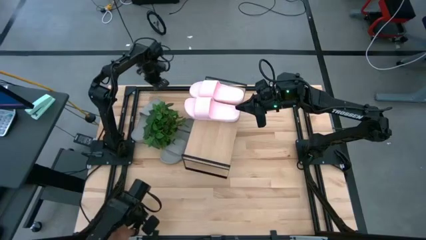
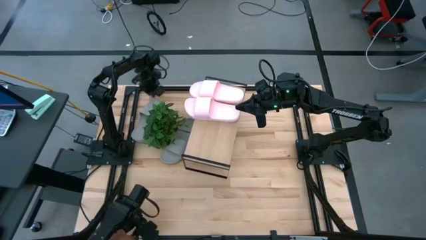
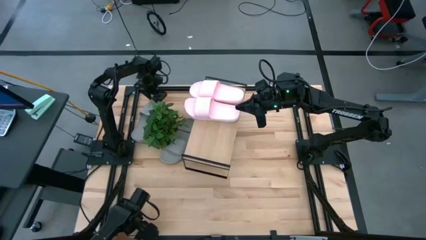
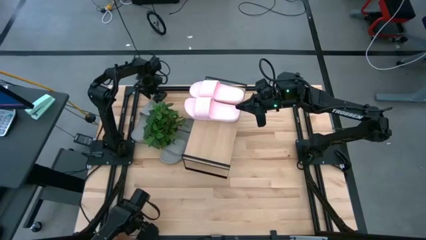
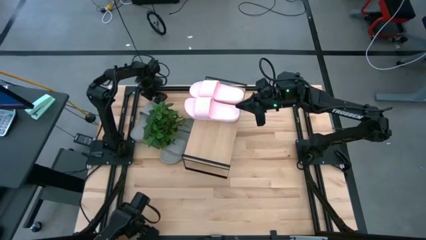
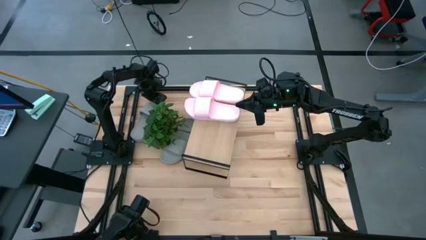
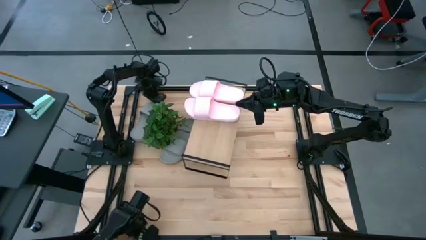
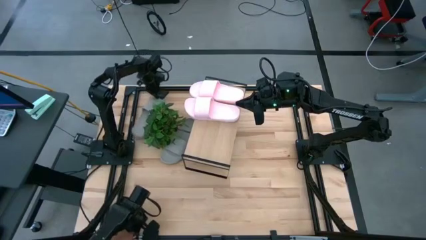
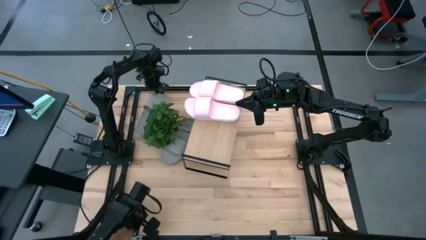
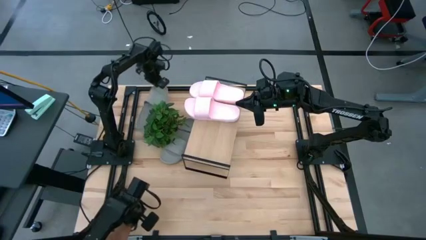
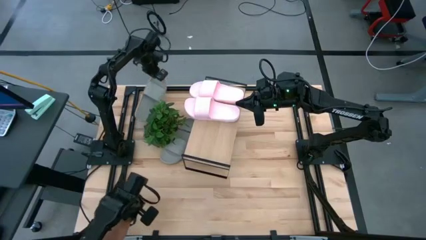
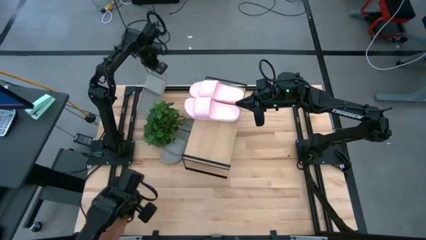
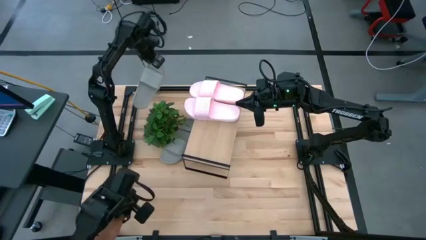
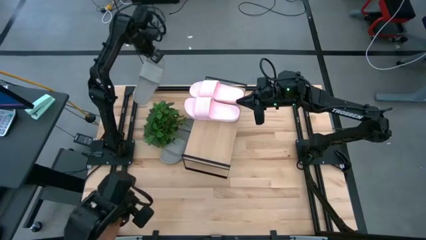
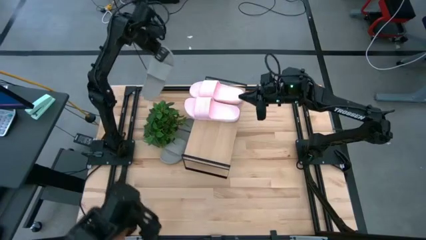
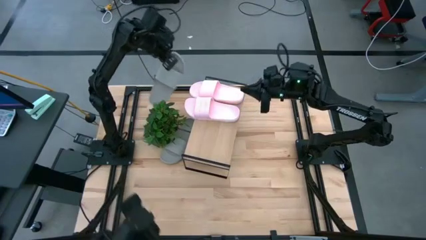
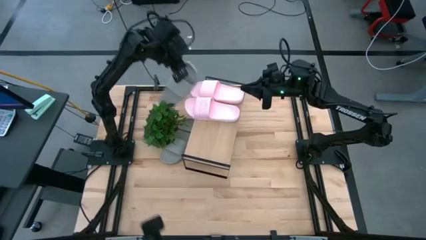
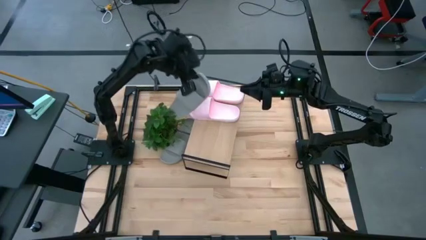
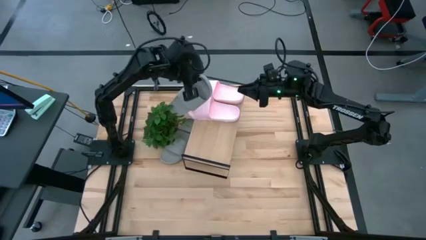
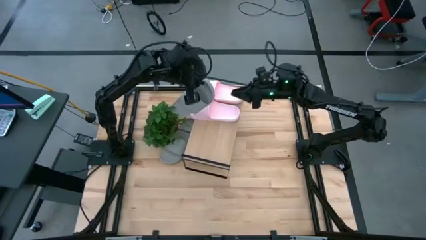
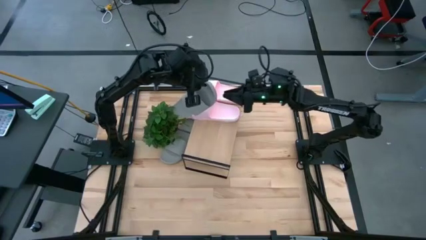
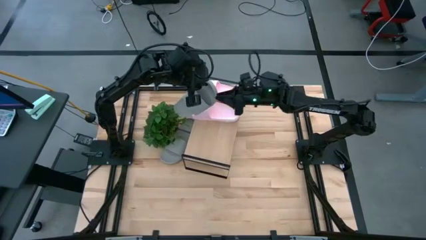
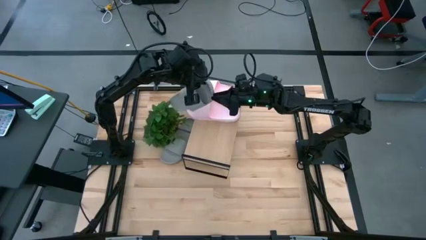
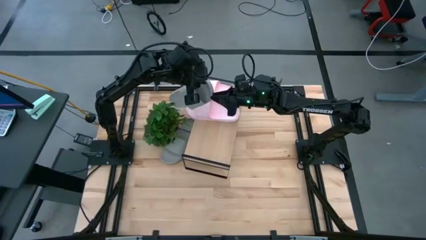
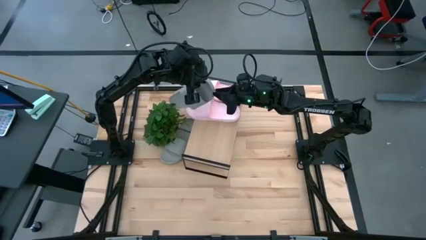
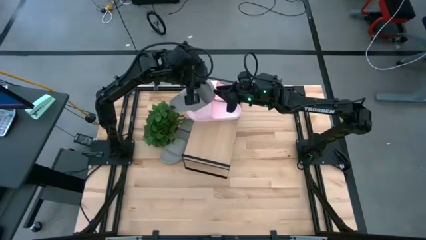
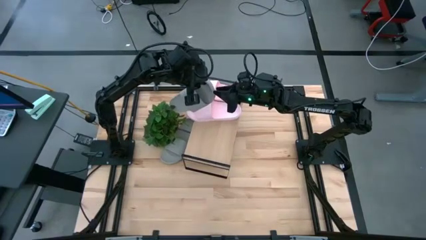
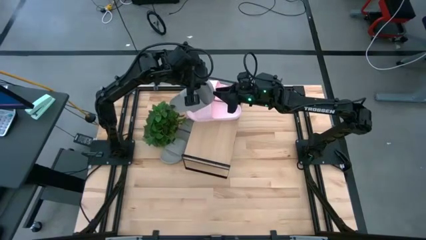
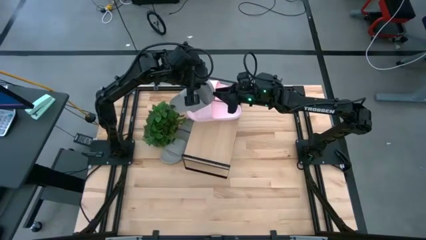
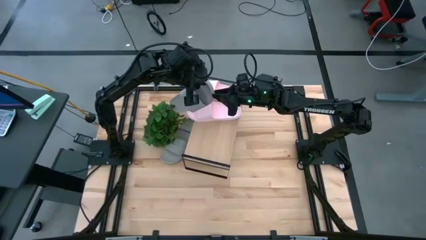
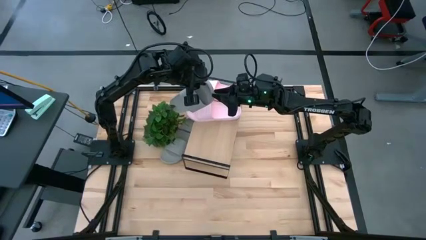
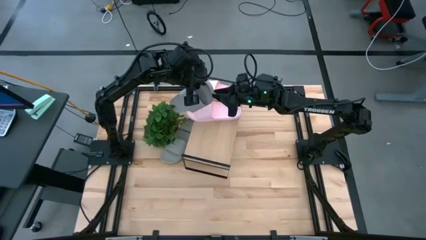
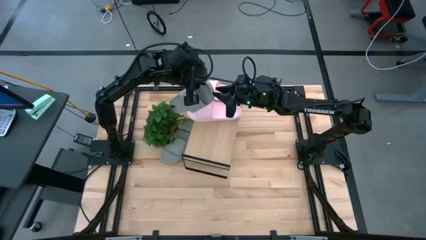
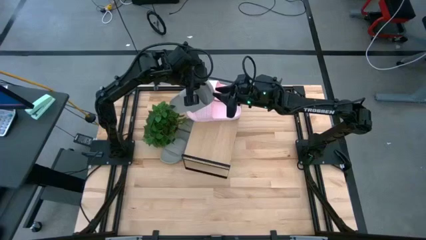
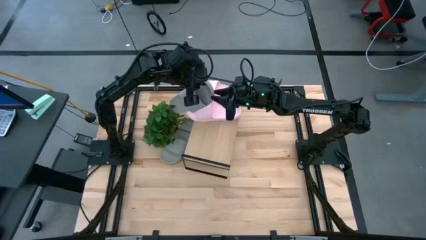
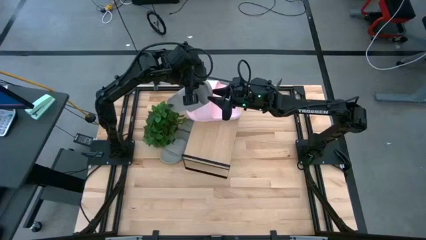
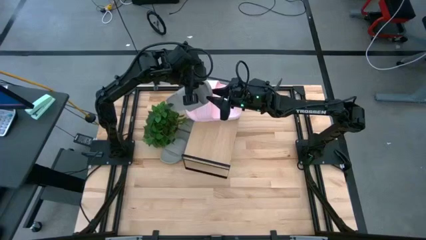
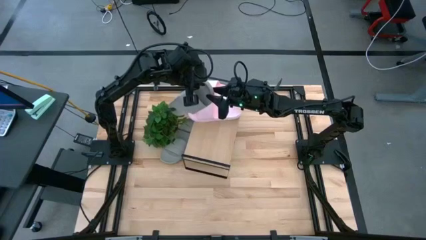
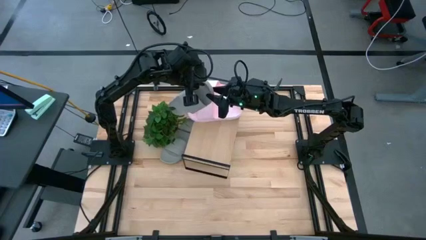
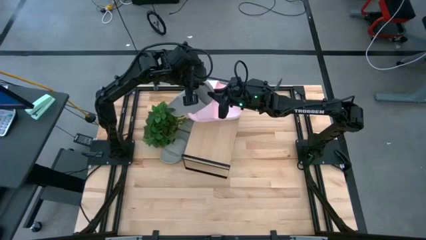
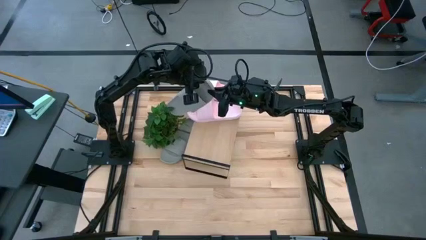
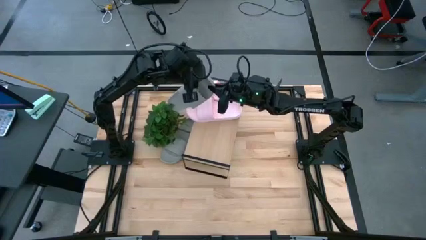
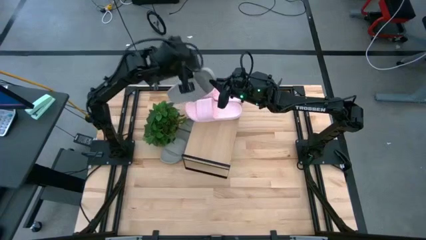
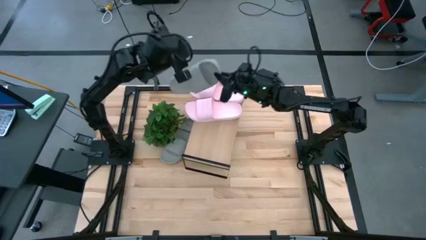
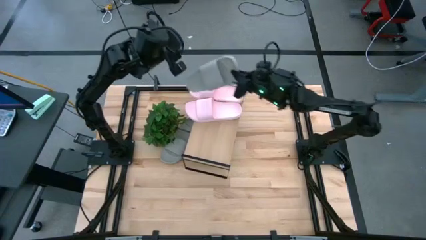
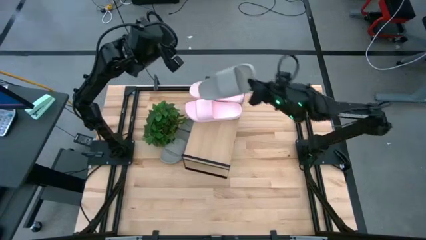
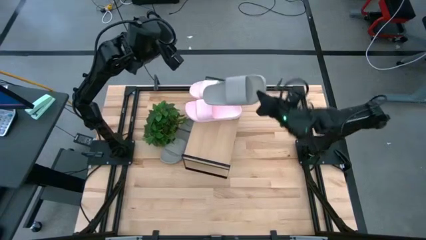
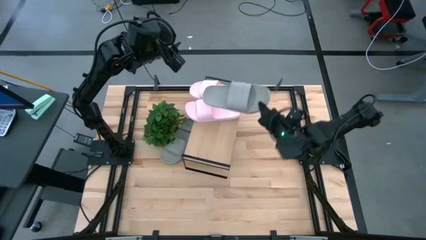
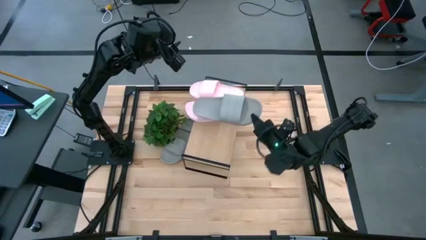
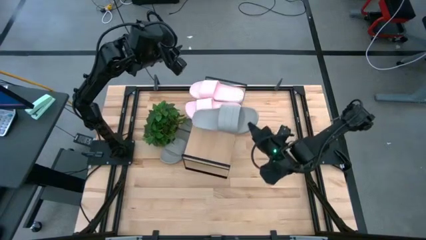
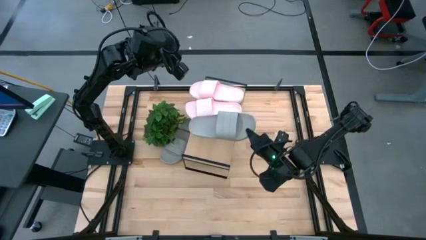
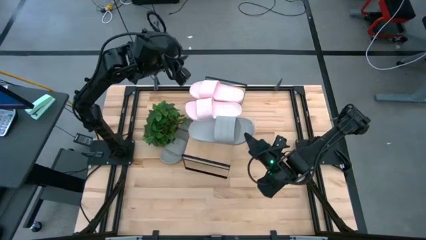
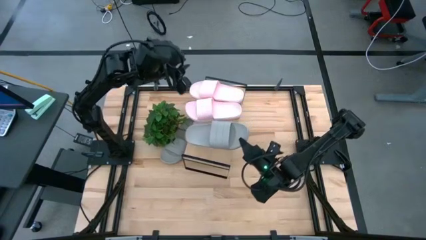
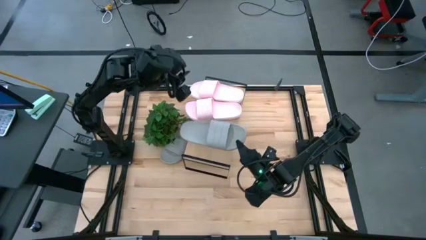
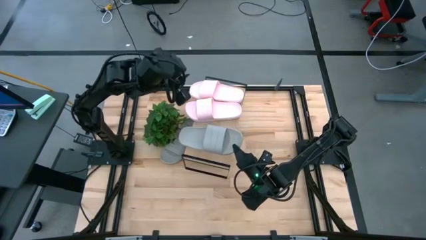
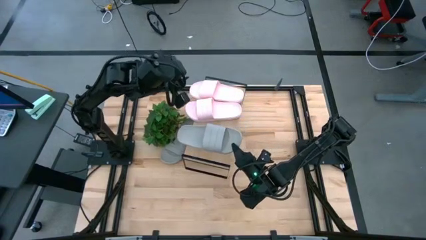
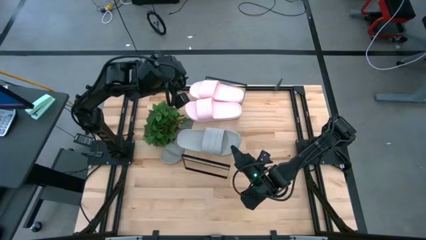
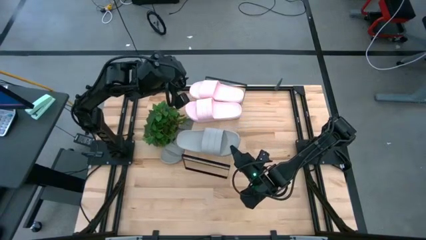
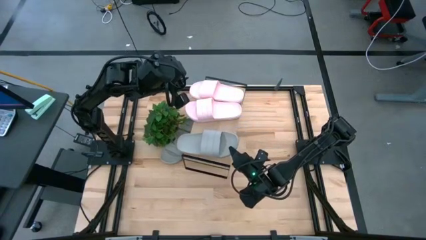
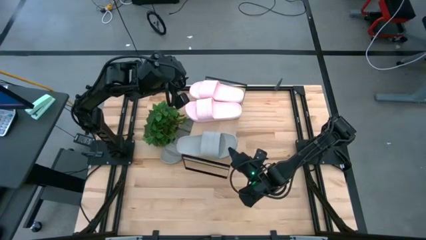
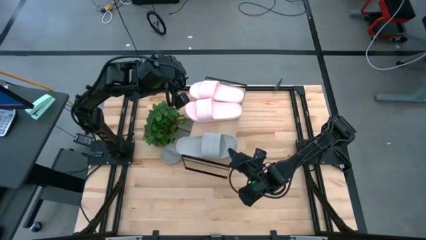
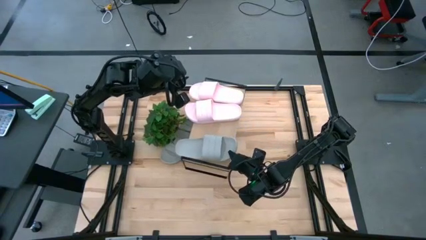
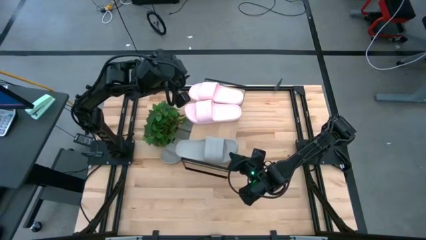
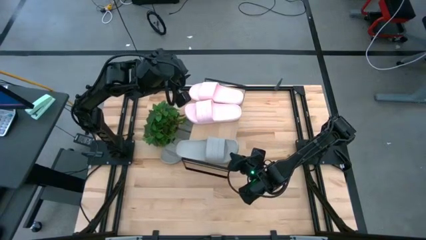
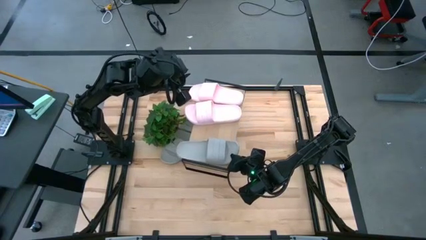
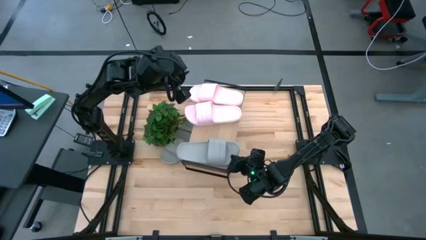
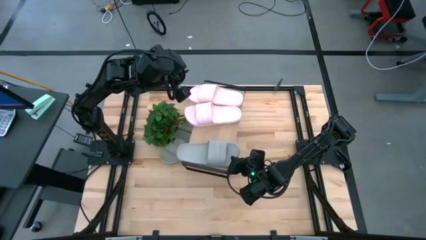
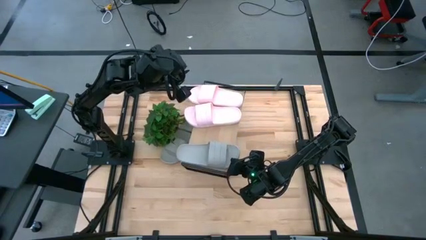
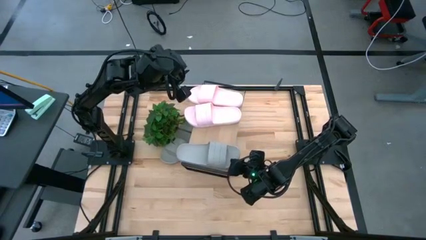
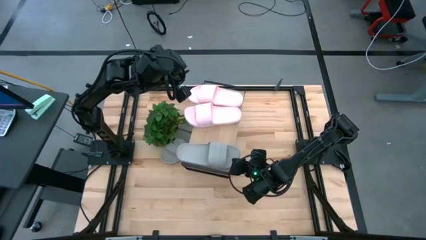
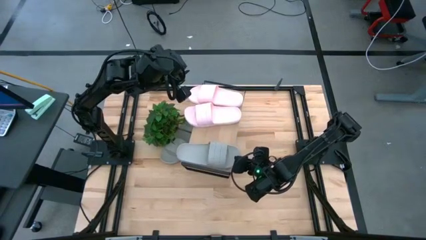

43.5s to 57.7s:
Task: Pick and place slides into the shelf
Put the top gray slide on the shelf
